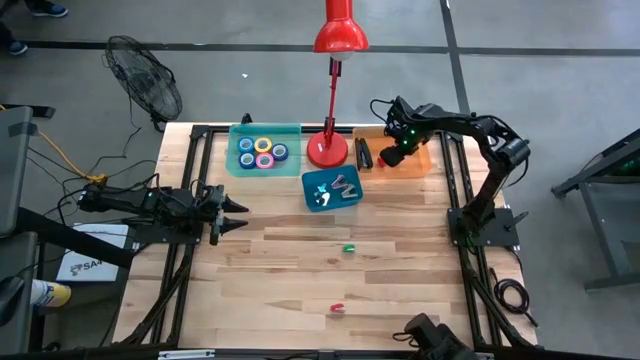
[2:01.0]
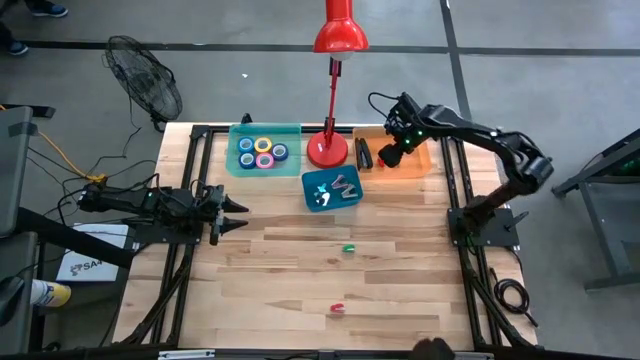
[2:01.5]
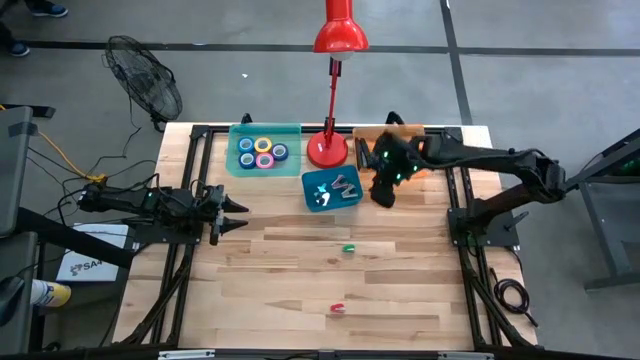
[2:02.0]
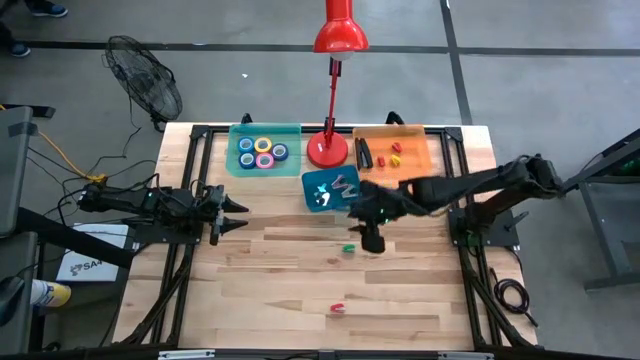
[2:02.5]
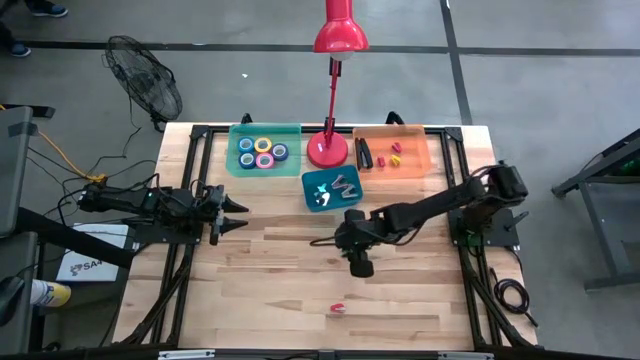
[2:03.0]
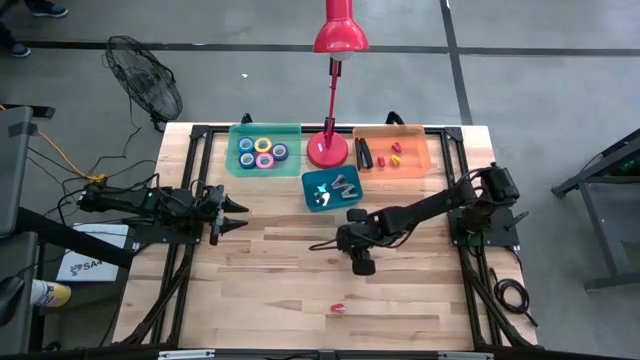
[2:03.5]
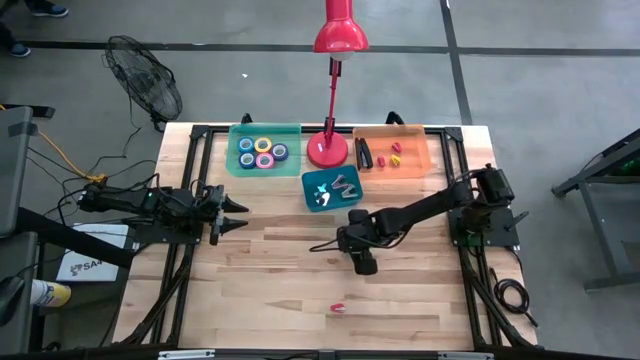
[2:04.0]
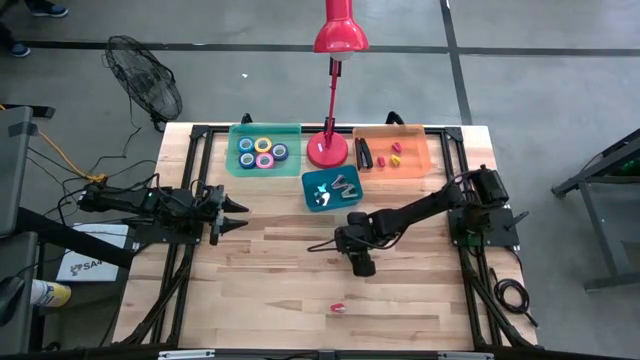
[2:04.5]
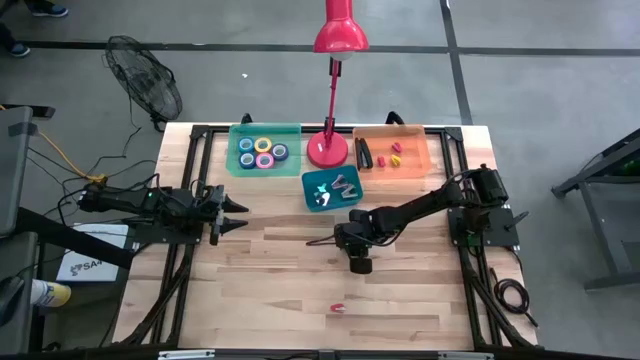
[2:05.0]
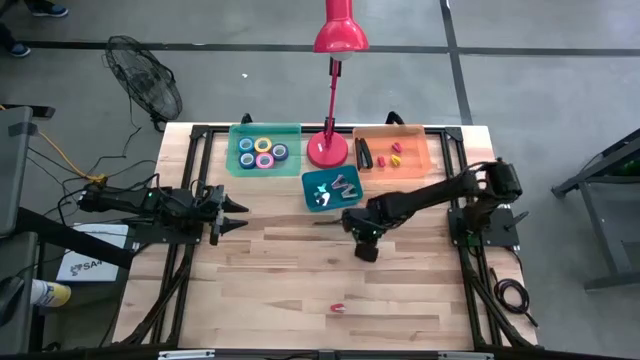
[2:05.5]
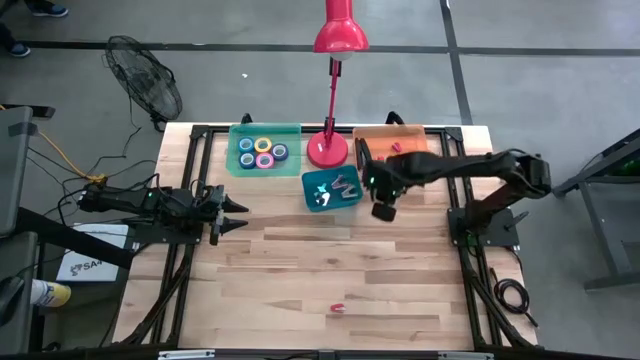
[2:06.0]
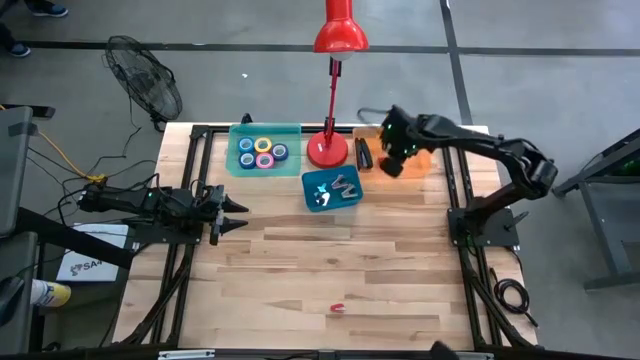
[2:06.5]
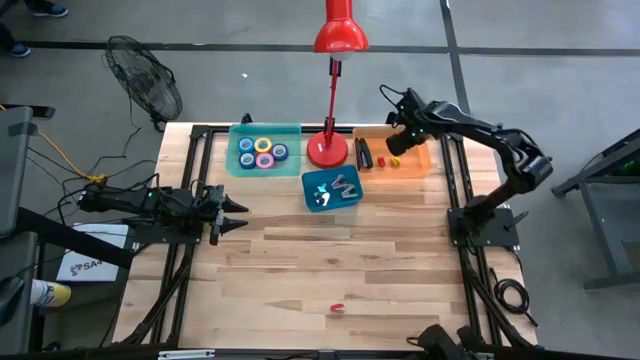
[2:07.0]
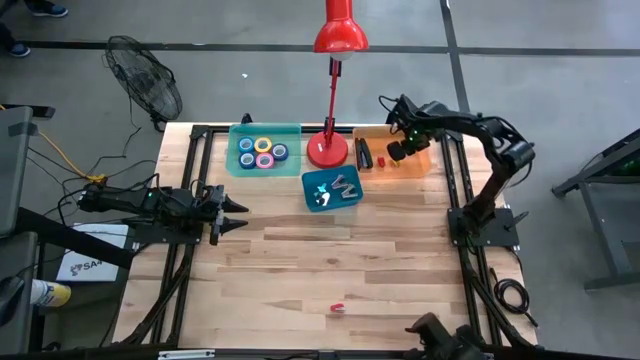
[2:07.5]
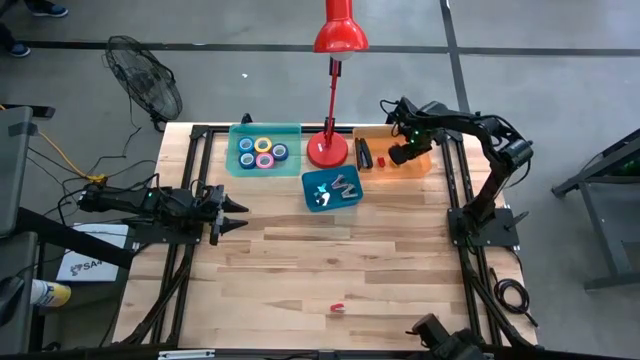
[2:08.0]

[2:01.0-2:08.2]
Task: Pick and place Stapler, Stapler remover, tape
Put the green stapler into the orange bin

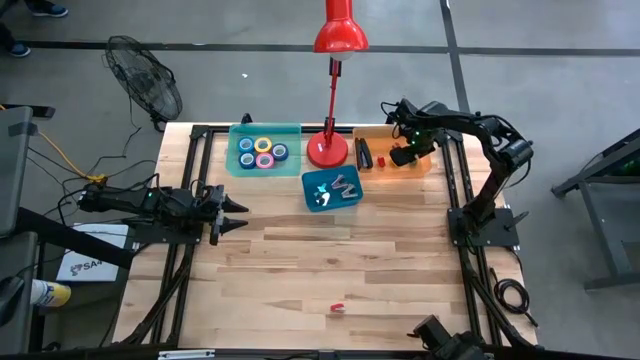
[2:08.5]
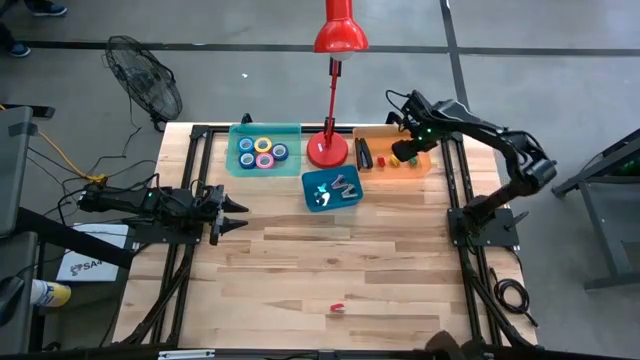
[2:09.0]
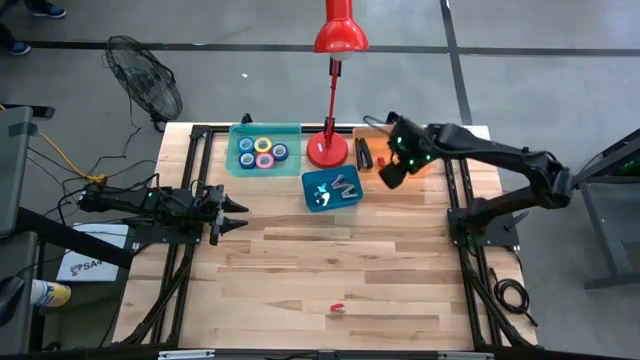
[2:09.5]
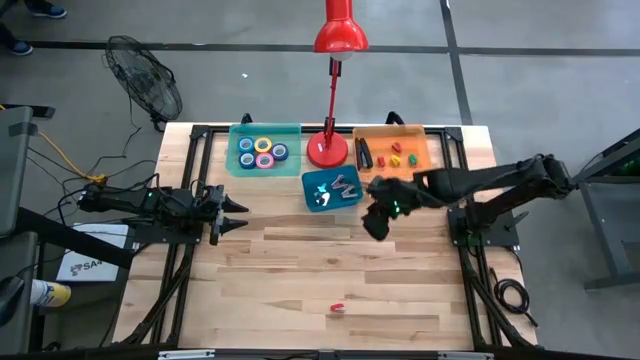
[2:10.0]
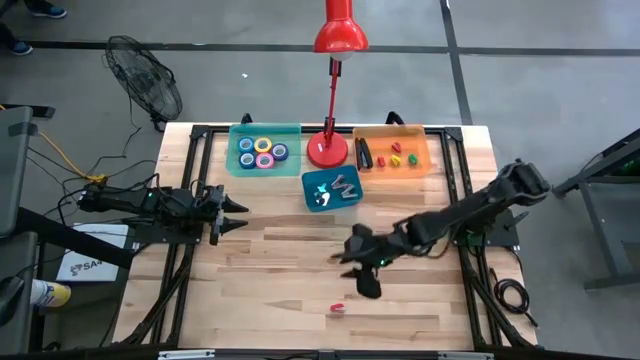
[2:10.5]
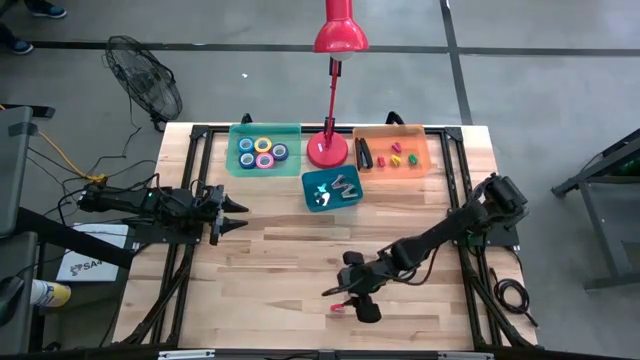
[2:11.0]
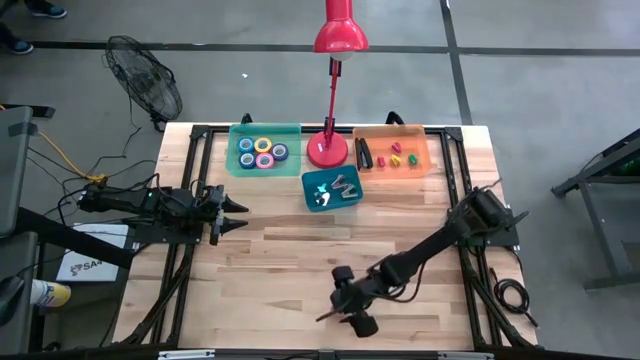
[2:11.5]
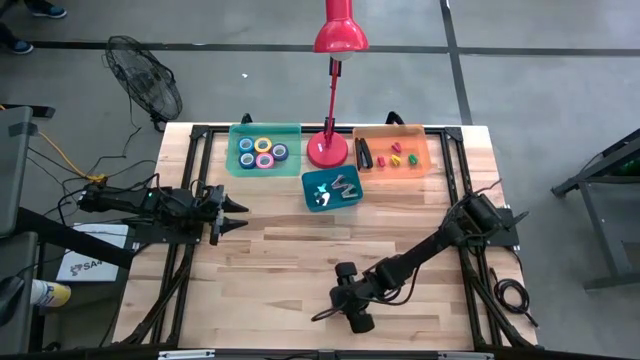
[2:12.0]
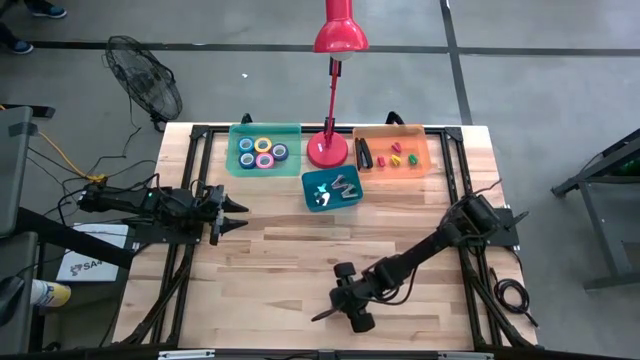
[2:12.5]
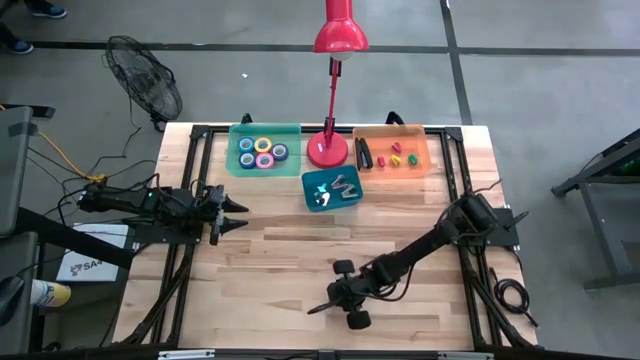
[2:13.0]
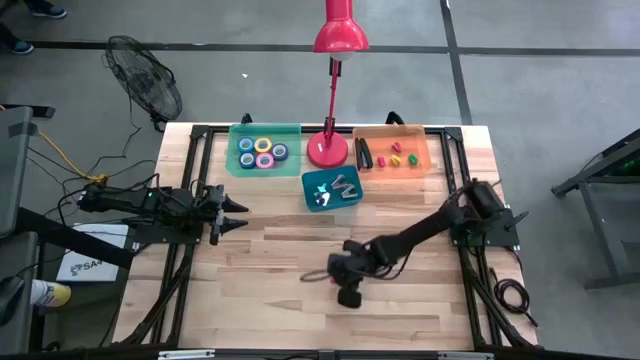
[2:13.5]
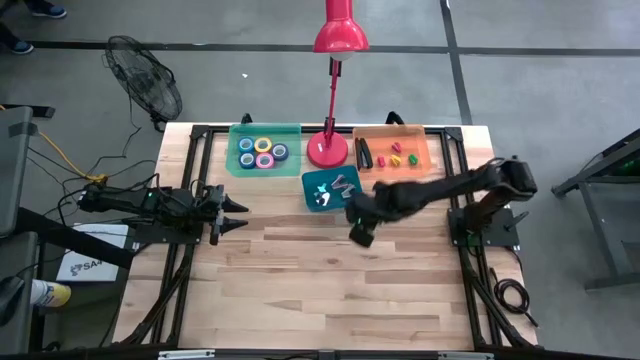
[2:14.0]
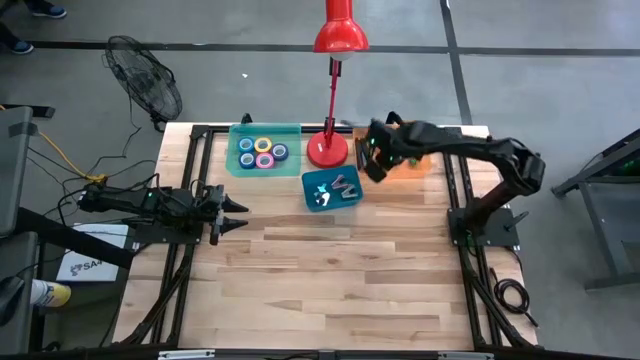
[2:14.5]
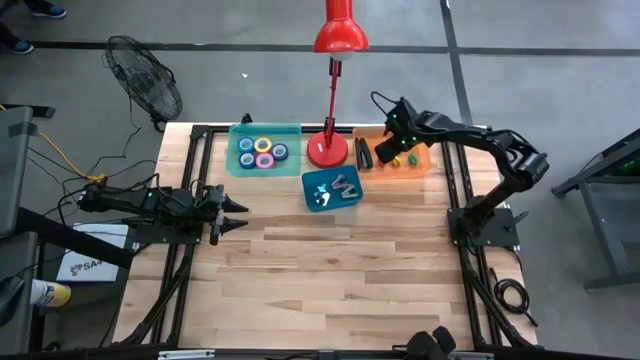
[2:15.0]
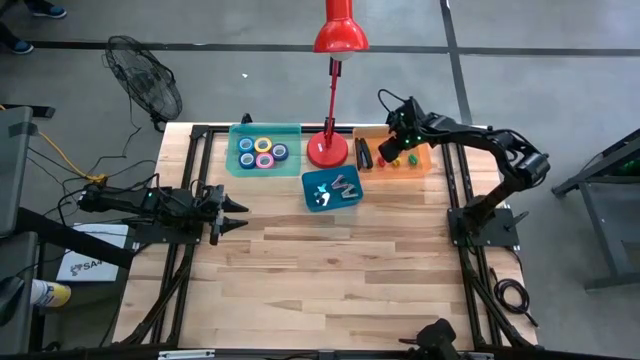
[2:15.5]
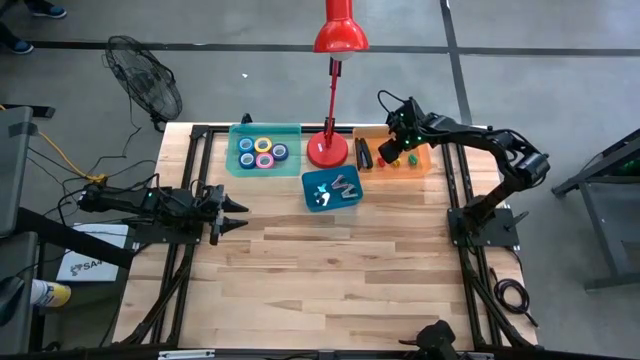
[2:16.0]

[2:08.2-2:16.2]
Put the red stapler into the orange bin

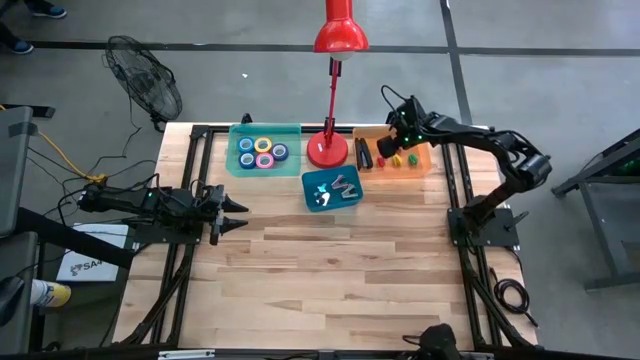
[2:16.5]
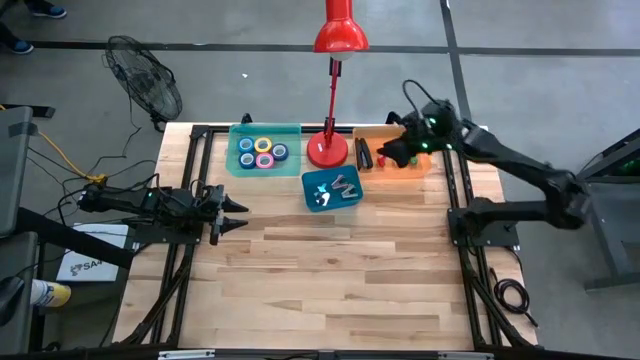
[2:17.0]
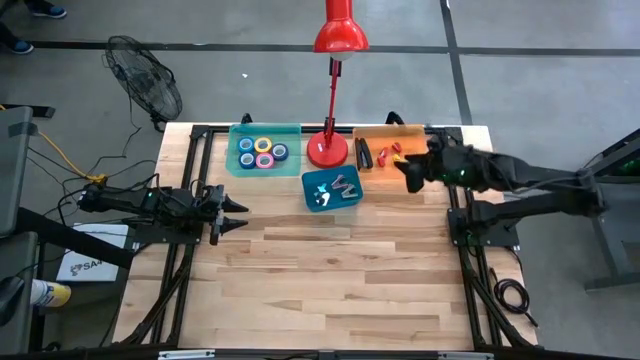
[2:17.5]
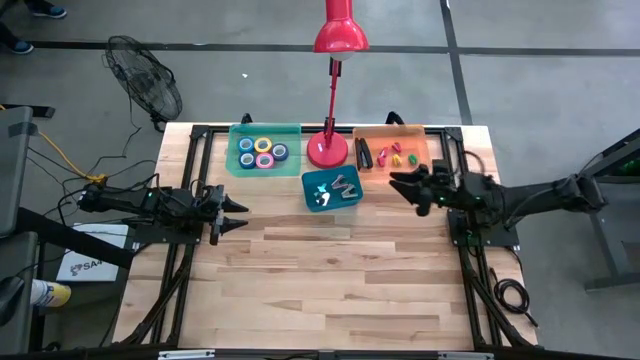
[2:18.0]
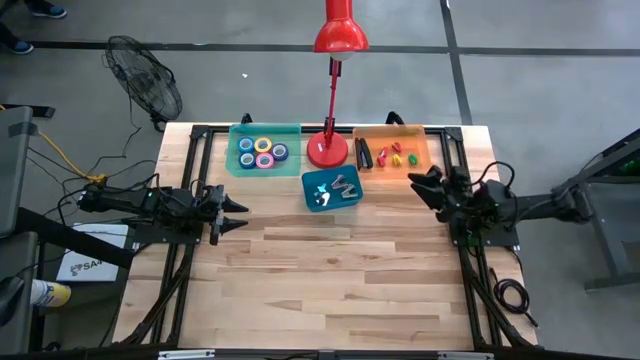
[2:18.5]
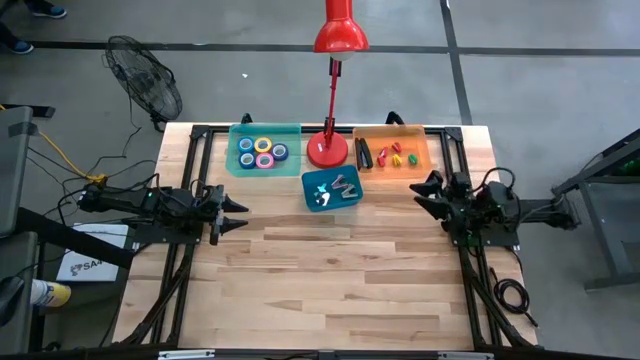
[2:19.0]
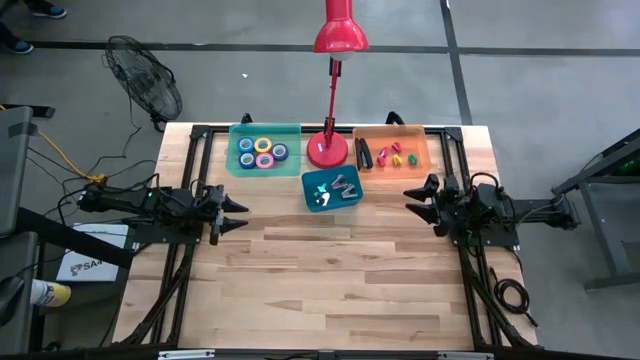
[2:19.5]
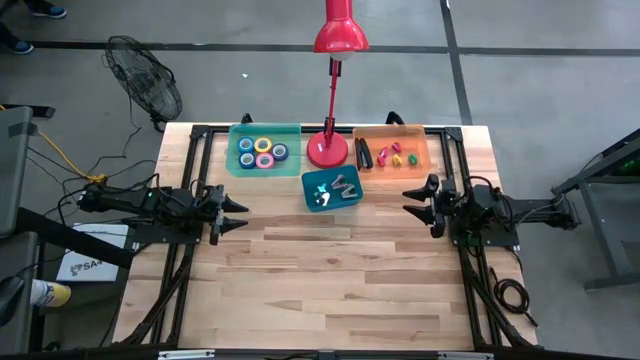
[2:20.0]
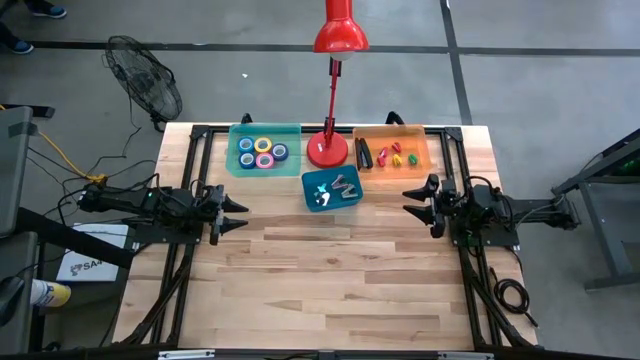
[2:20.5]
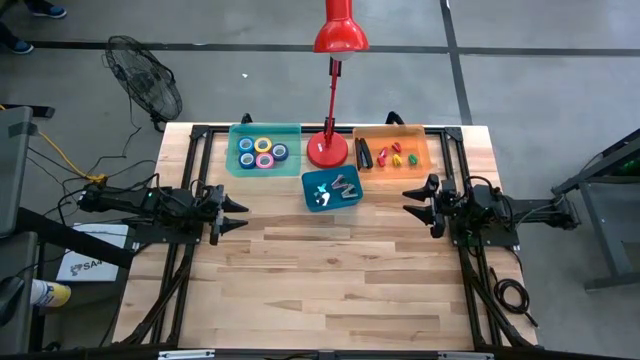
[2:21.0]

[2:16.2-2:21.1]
Return to Home Position

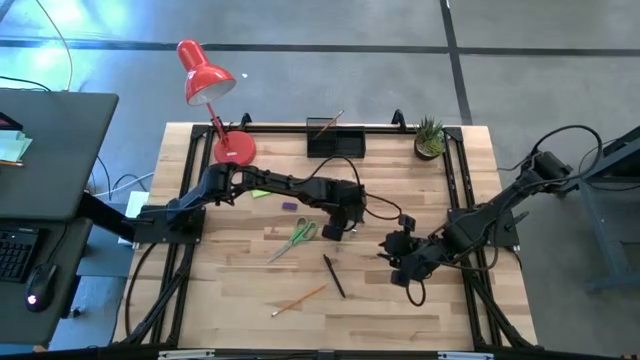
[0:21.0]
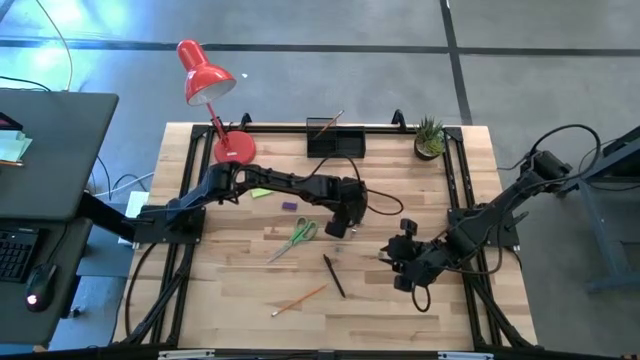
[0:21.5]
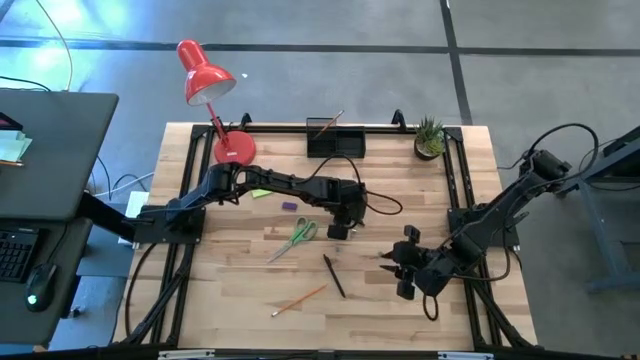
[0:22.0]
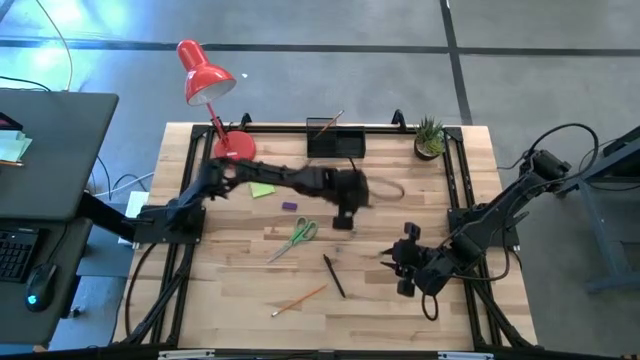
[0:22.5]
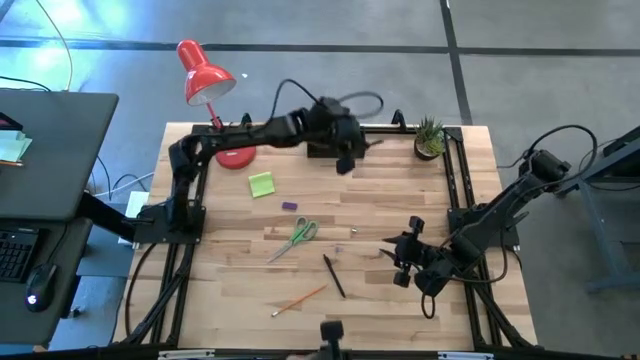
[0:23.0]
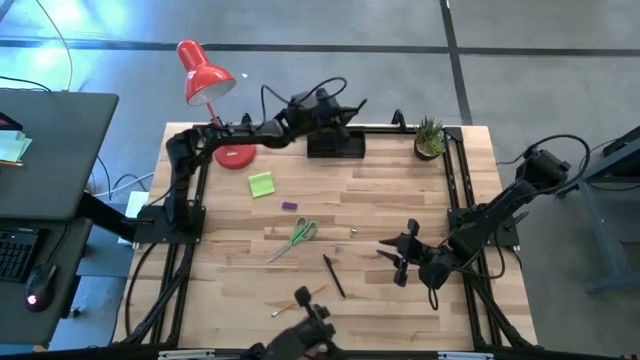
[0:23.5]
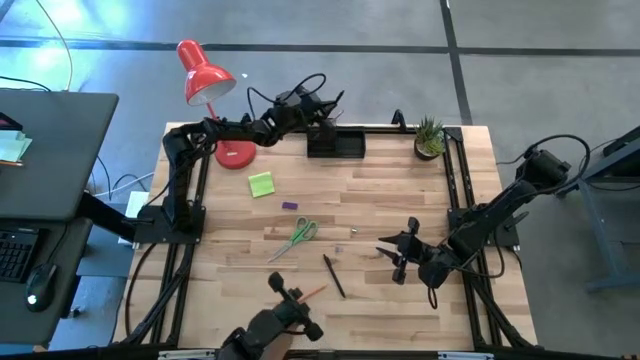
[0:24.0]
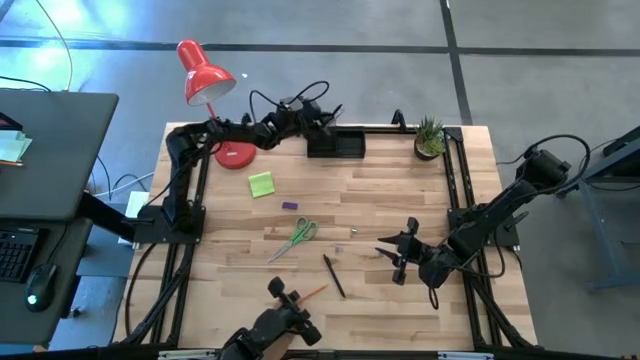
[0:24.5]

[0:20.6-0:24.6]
Task: Pick and place office supplies into organizer
Put the right black pen into the desk organizer
